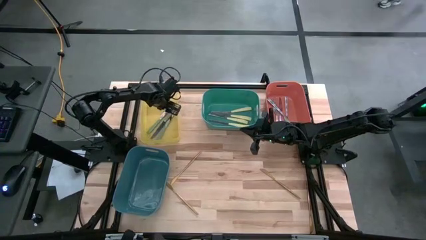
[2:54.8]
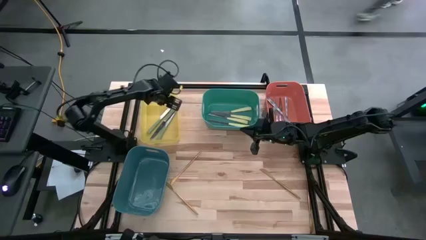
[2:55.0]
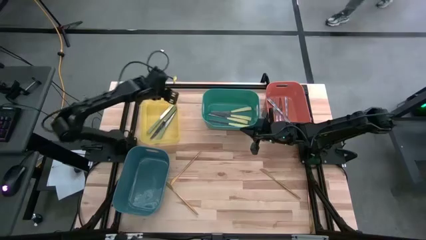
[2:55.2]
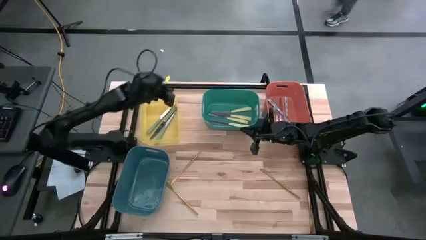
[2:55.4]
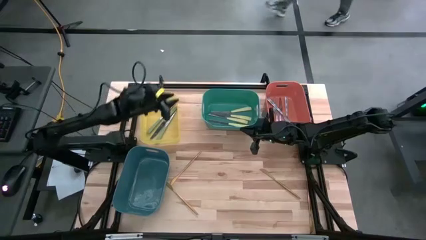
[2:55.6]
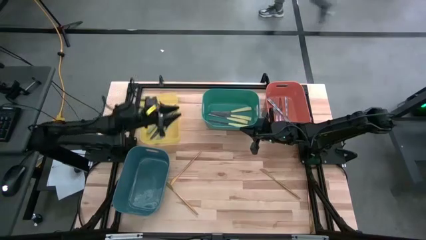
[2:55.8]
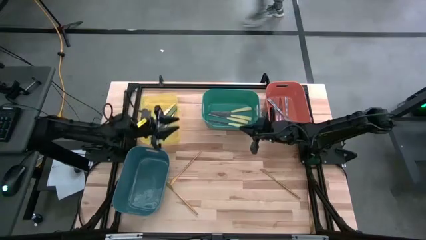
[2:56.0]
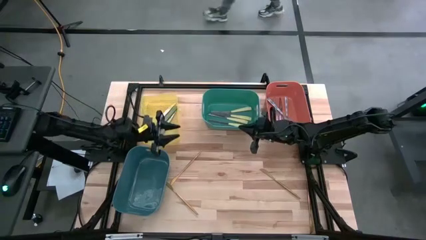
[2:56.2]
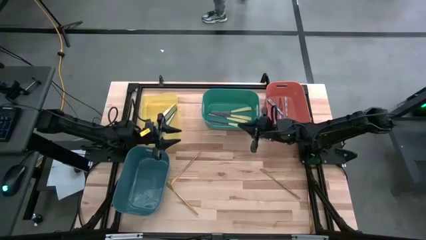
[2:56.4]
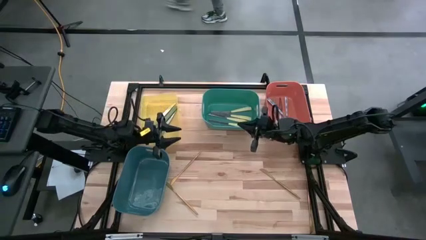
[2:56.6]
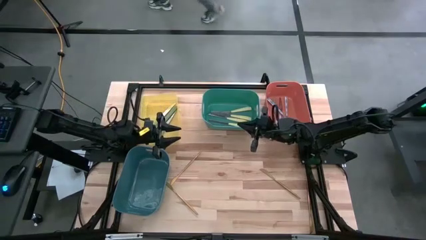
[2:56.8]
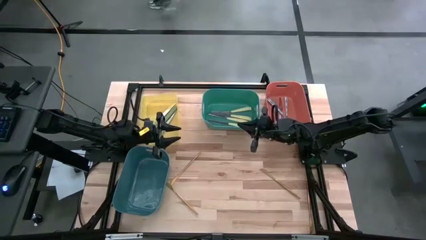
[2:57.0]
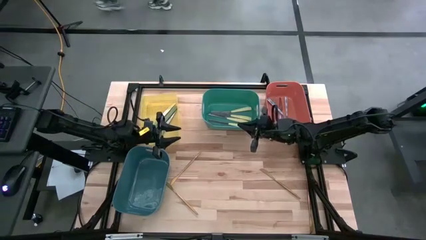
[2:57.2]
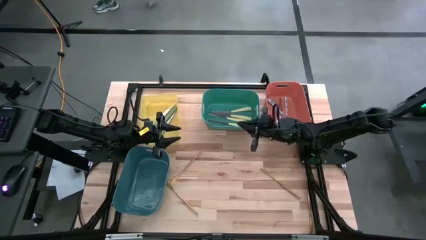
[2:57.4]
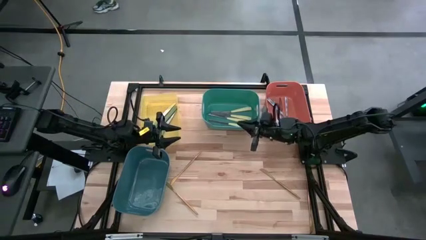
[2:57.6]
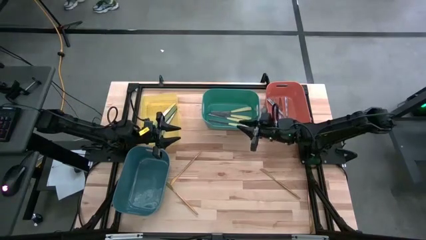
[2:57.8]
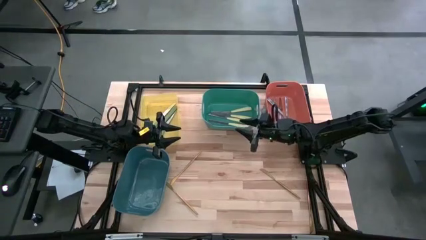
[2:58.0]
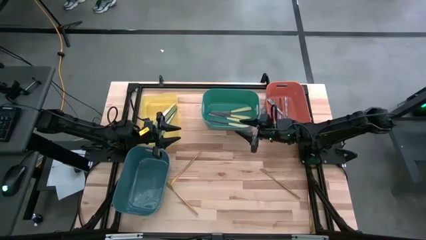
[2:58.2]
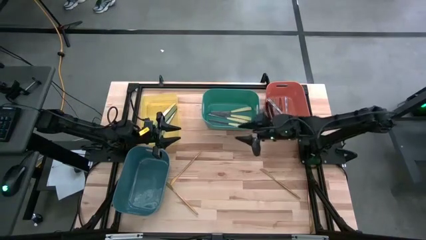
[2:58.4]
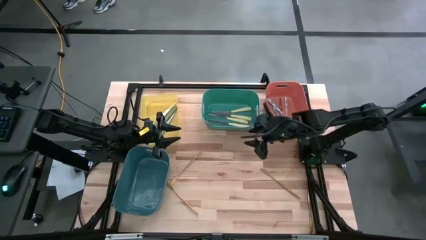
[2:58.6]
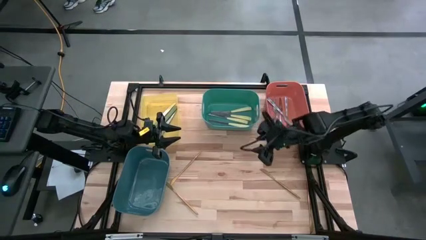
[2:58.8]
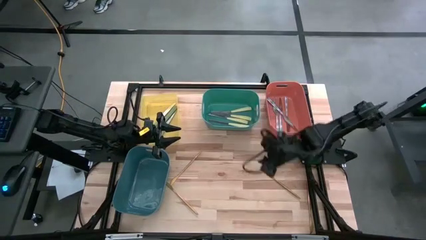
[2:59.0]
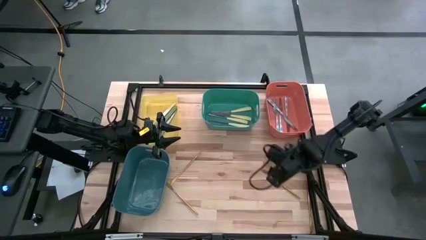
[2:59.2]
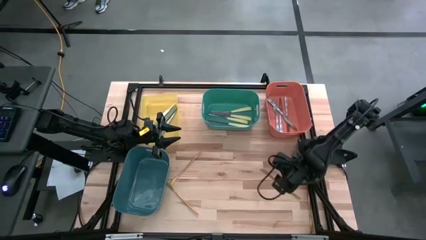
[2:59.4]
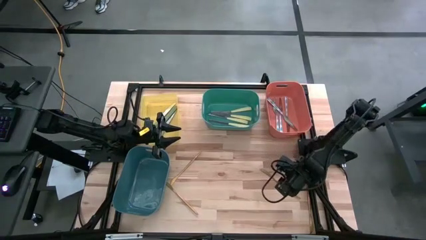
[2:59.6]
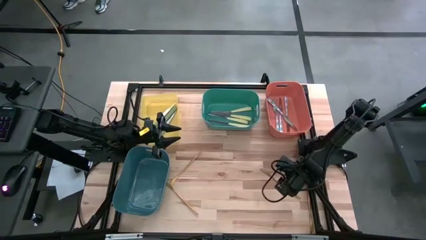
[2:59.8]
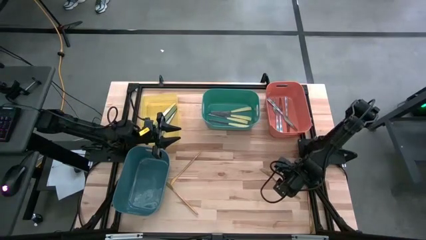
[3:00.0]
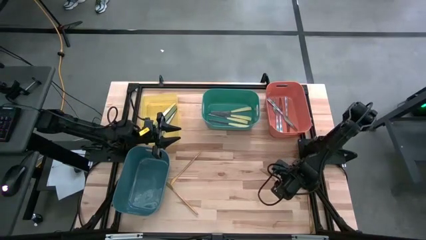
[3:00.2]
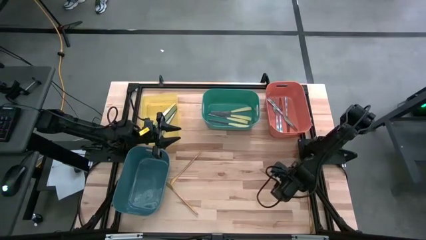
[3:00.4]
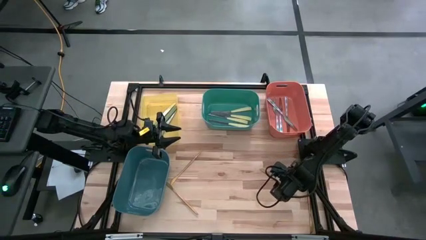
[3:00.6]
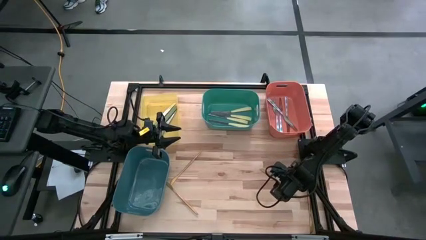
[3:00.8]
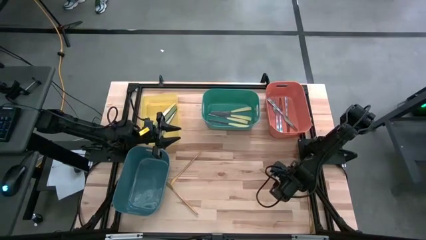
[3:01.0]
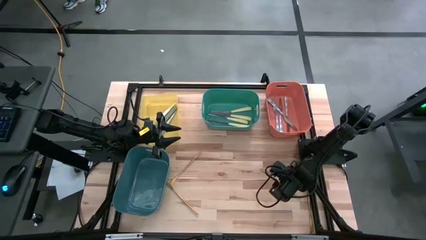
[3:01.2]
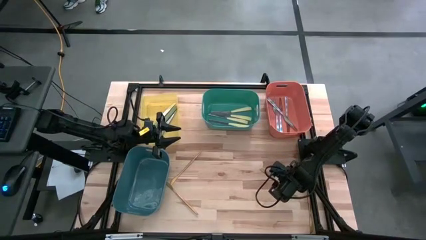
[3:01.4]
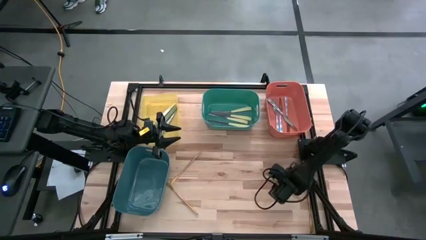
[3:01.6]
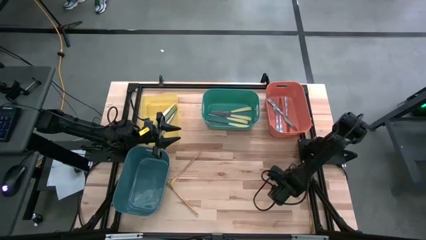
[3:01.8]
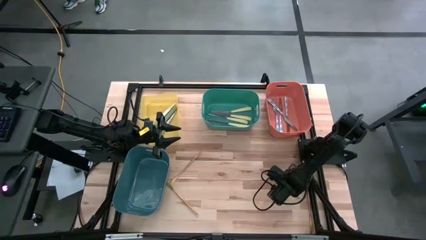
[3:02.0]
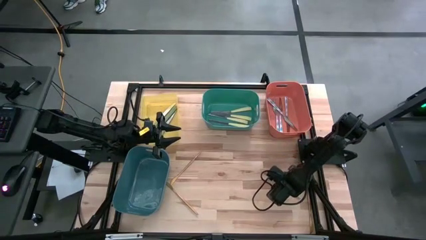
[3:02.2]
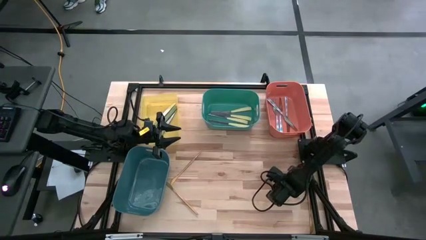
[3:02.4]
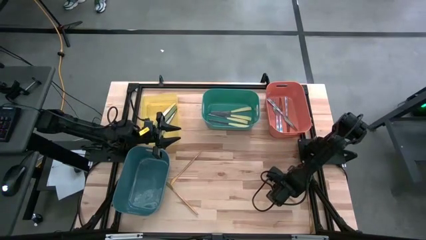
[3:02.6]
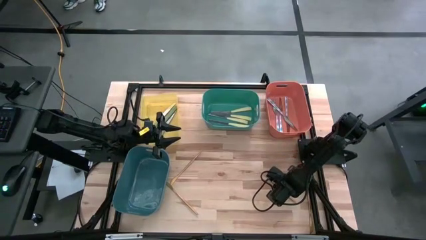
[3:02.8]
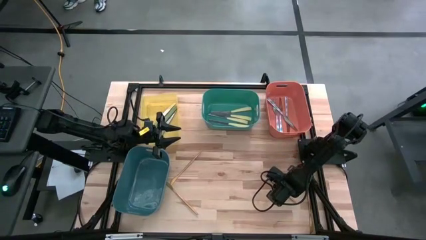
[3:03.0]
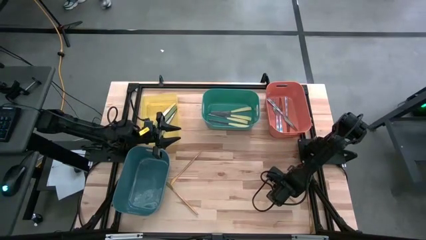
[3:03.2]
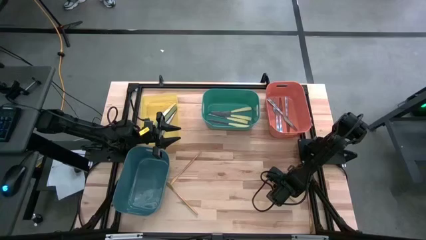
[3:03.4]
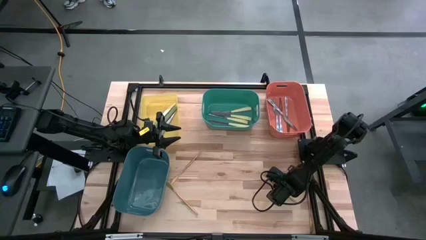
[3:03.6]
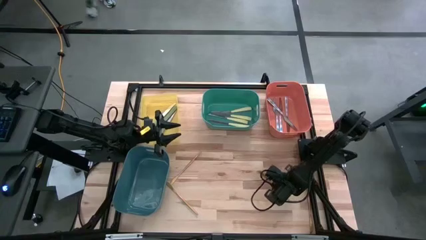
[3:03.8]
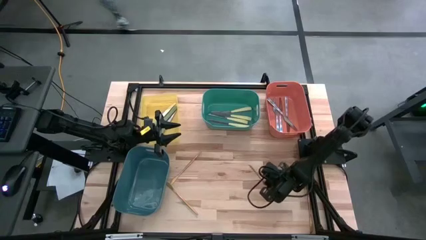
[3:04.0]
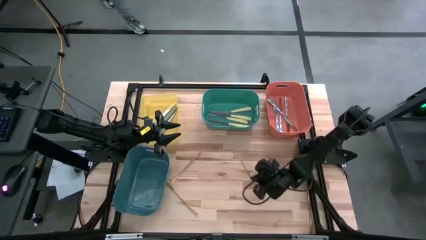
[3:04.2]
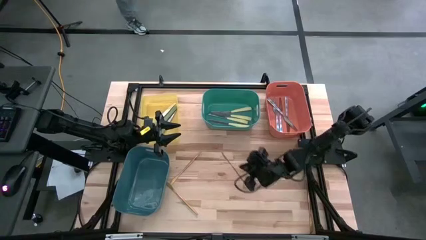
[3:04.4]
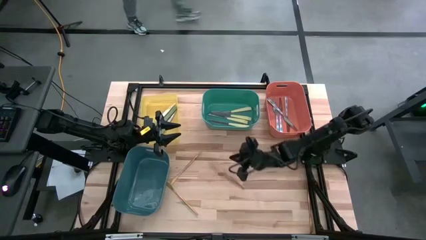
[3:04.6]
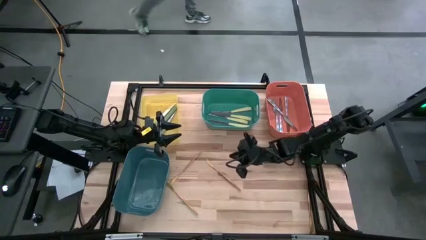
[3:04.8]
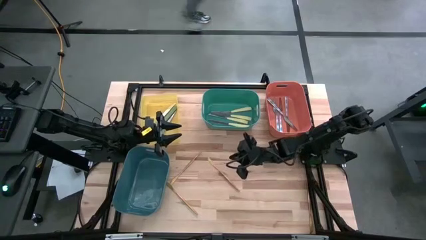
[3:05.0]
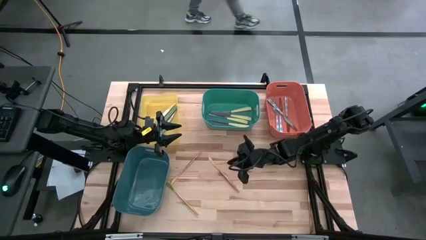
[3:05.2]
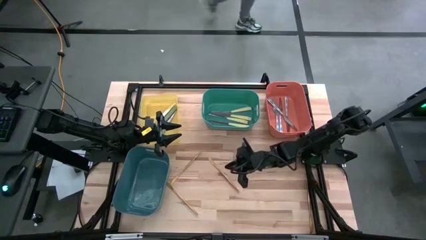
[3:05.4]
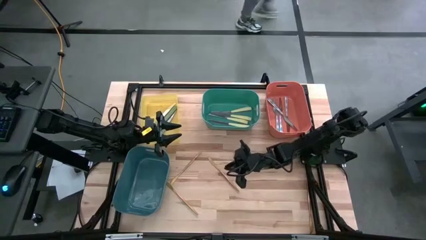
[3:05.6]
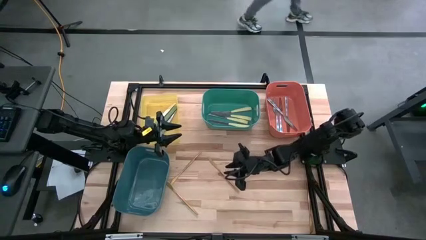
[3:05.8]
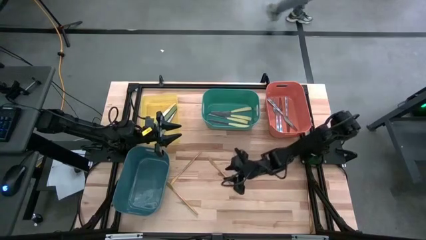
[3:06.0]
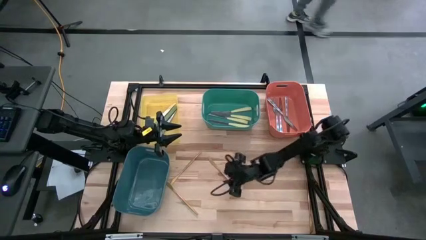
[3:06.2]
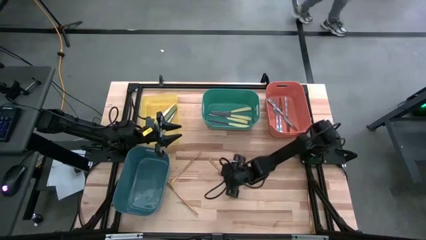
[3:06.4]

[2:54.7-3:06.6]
Task: Sort silverware by color (type)
Put the gold knife into the blue bin
